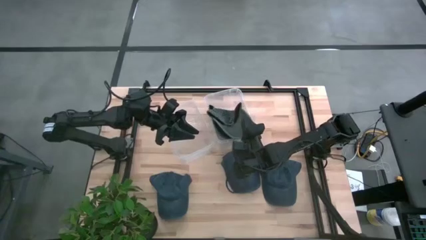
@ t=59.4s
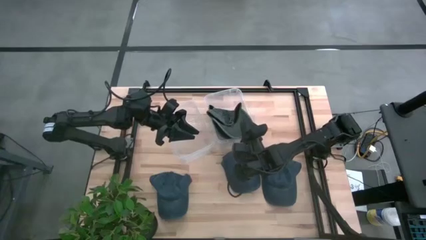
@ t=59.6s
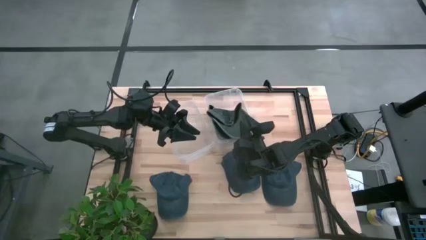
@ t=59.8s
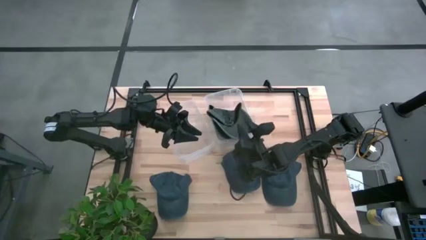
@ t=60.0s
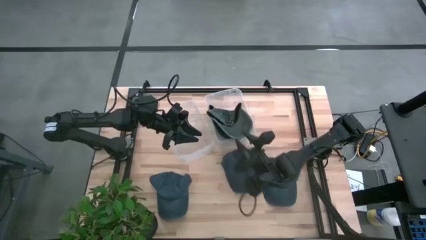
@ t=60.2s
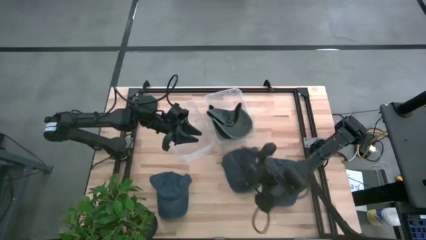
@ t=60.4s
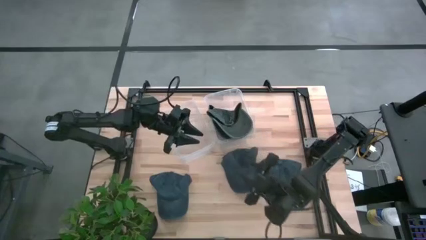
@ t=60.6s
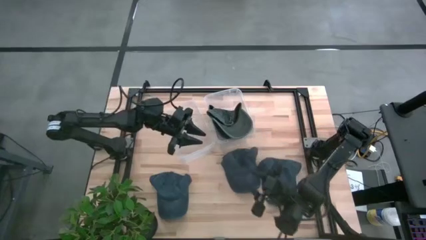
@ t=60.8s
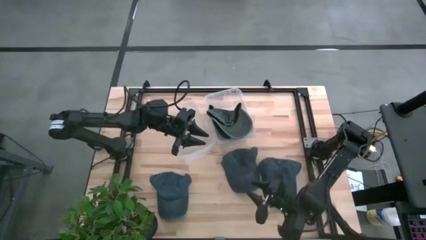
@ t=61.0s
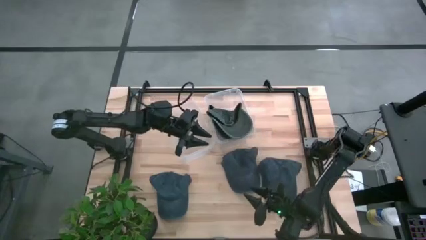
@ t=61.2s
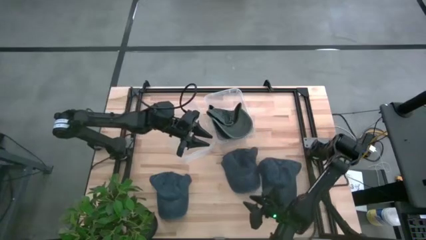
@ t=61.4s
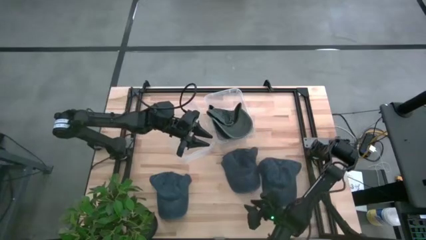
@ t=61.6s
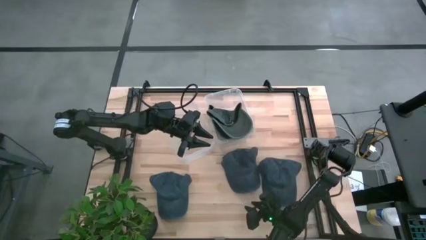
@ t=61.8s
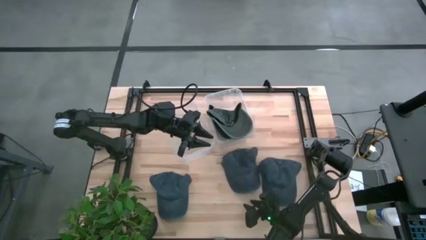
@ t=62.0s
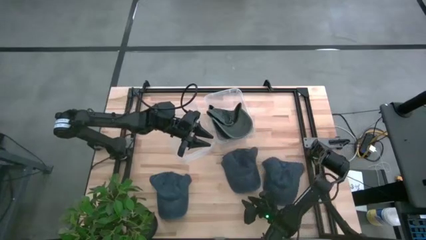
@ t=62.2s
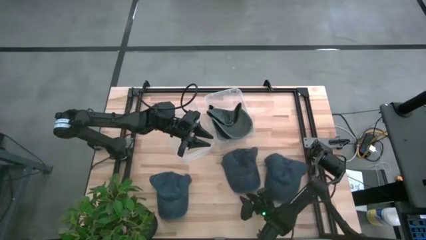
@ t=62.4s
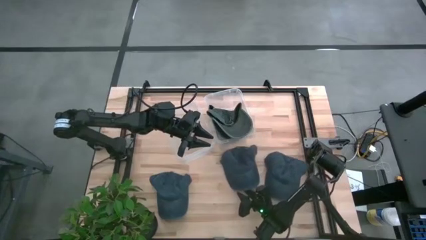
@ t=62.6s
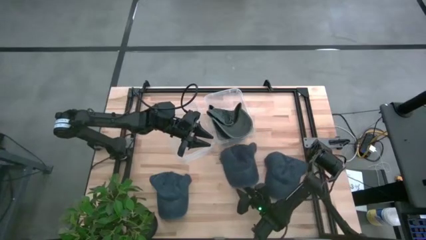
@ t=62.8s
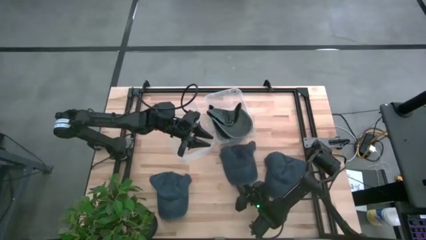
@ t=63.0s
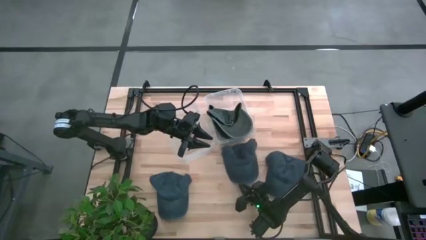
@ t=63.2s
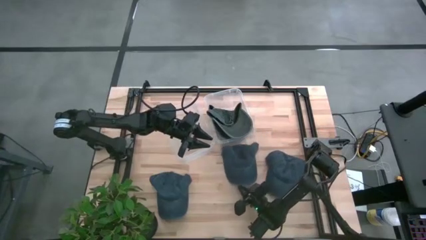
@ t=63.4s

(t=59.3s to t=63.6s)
Task: Pick & Place hat
Put the middle dark blue cap into the left transparent bin

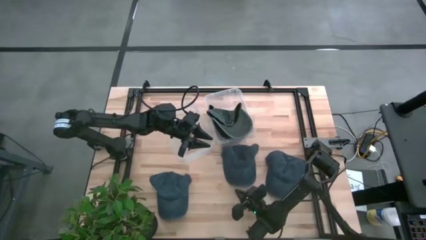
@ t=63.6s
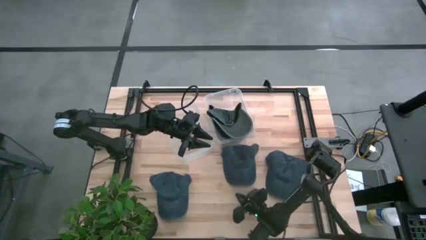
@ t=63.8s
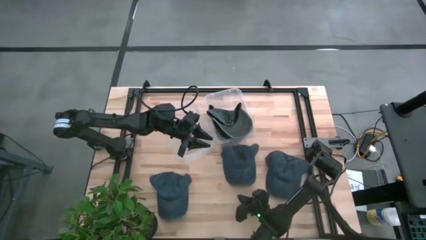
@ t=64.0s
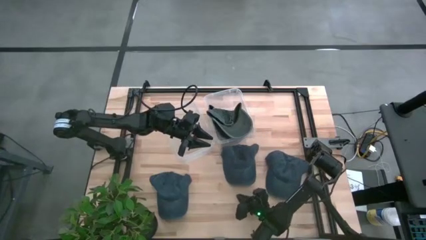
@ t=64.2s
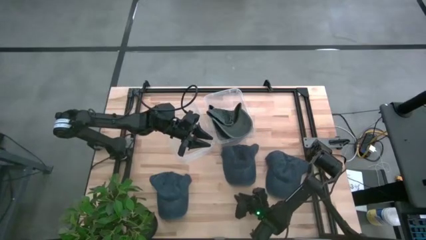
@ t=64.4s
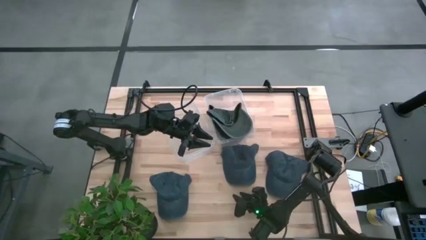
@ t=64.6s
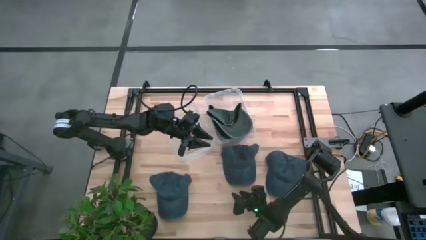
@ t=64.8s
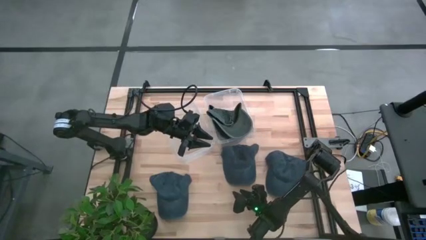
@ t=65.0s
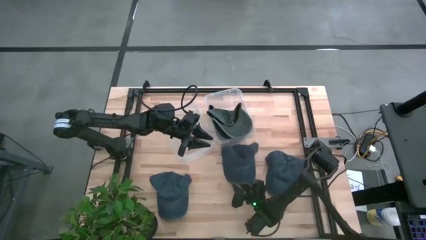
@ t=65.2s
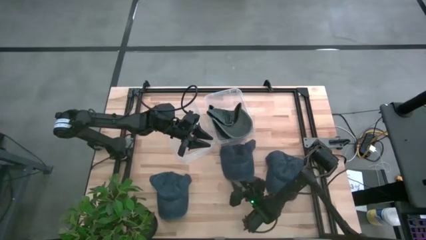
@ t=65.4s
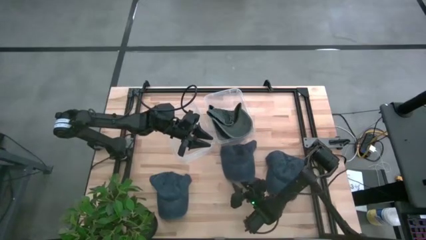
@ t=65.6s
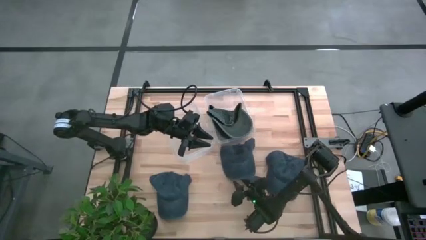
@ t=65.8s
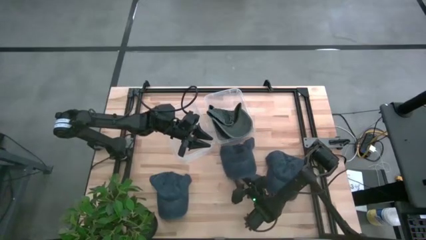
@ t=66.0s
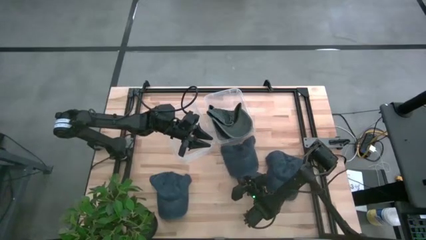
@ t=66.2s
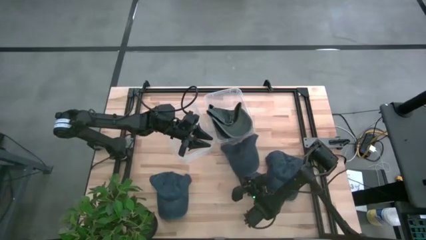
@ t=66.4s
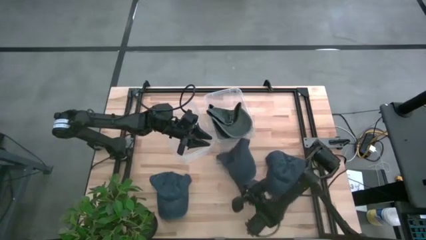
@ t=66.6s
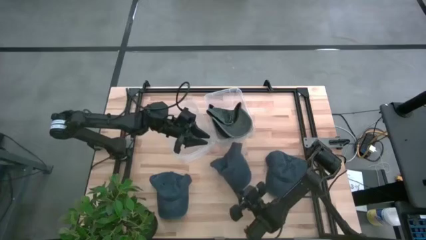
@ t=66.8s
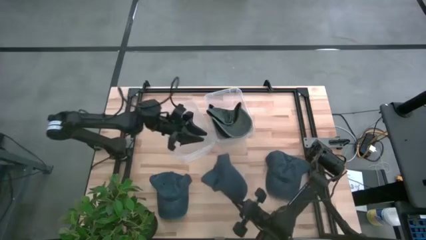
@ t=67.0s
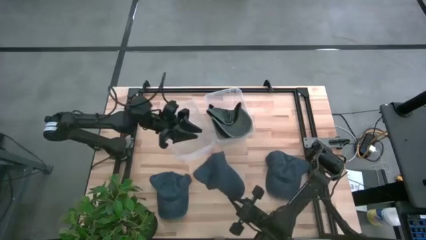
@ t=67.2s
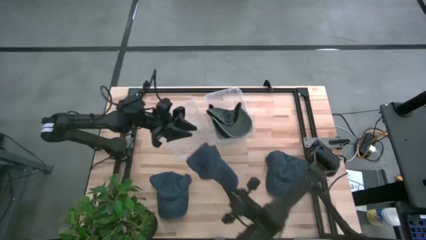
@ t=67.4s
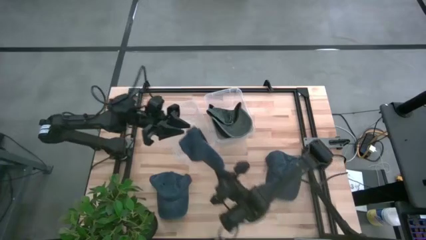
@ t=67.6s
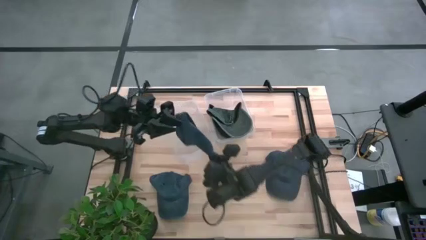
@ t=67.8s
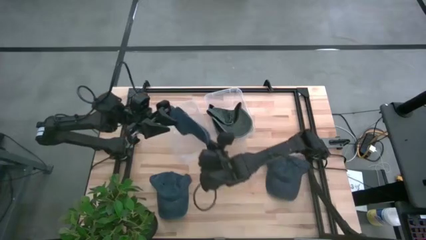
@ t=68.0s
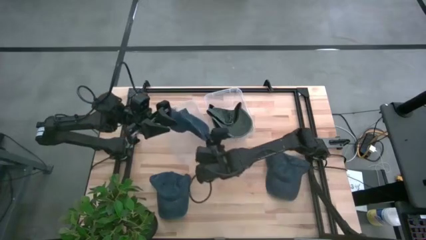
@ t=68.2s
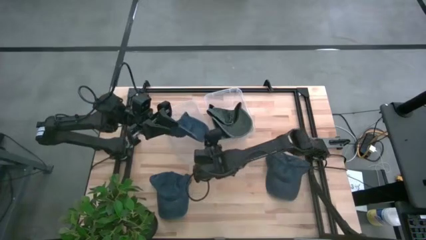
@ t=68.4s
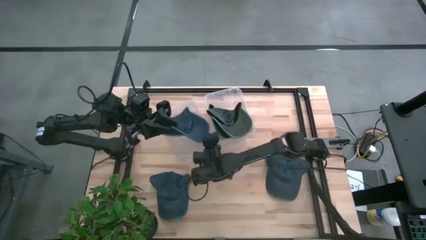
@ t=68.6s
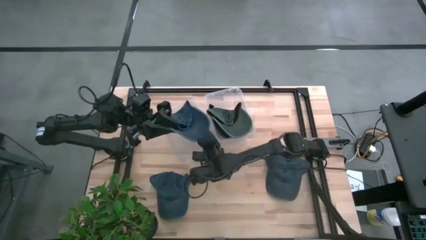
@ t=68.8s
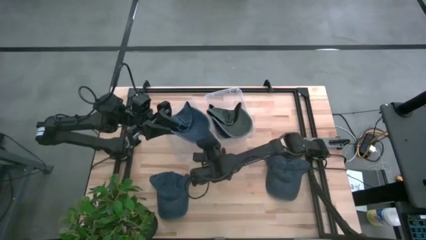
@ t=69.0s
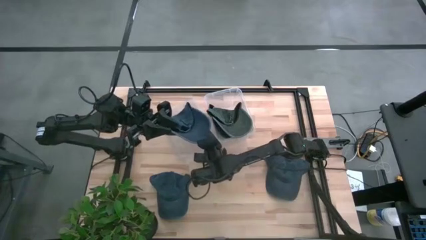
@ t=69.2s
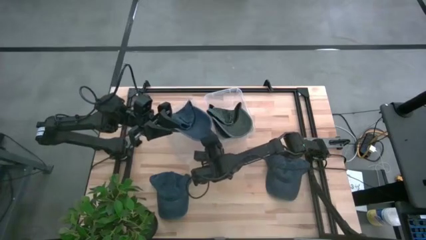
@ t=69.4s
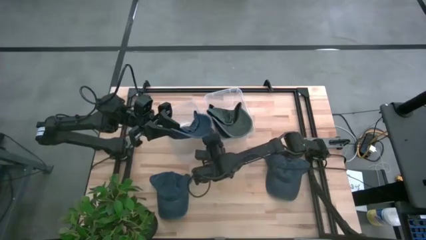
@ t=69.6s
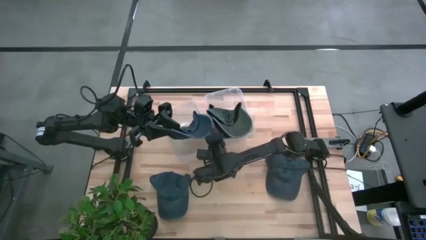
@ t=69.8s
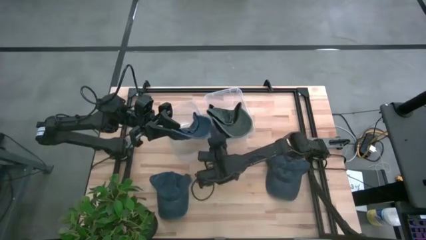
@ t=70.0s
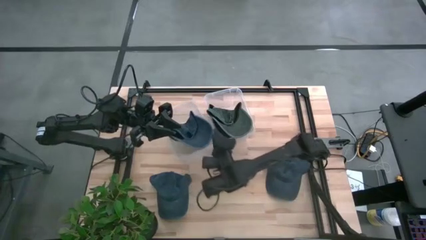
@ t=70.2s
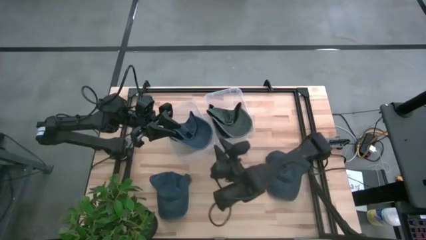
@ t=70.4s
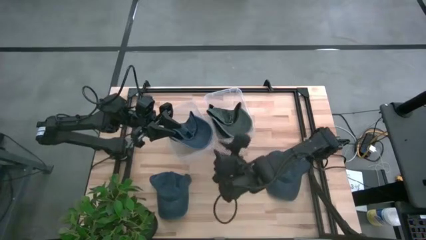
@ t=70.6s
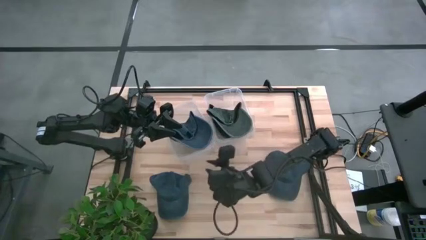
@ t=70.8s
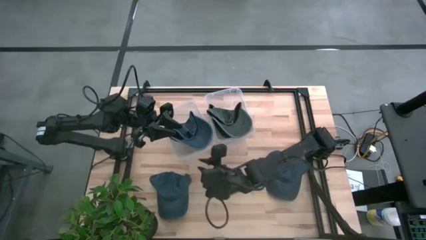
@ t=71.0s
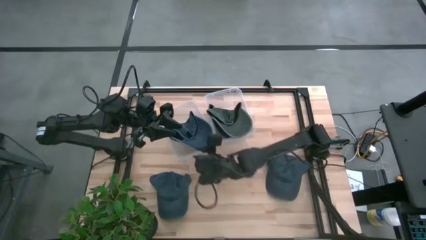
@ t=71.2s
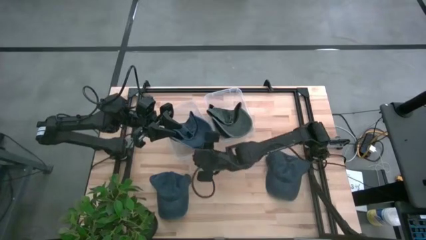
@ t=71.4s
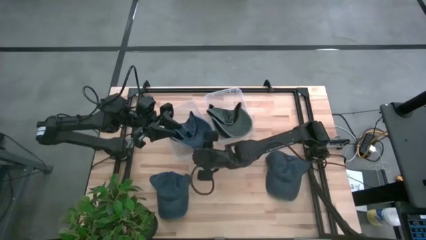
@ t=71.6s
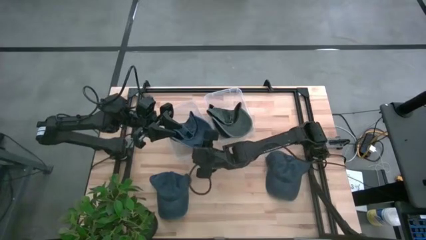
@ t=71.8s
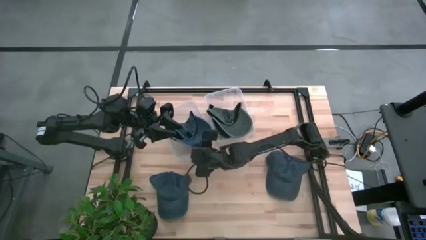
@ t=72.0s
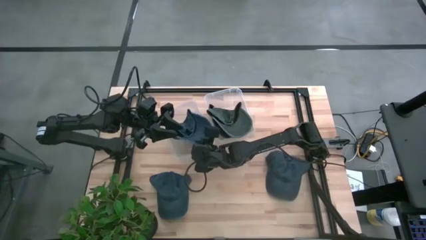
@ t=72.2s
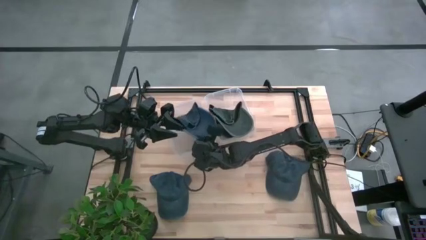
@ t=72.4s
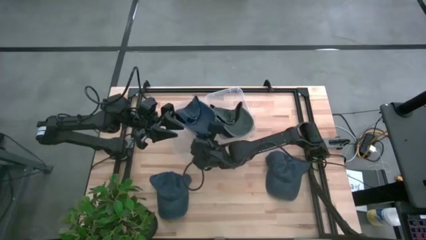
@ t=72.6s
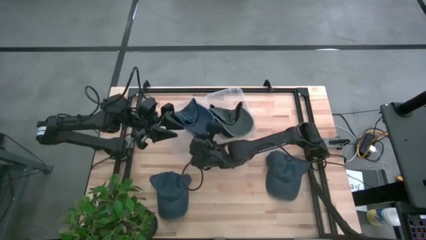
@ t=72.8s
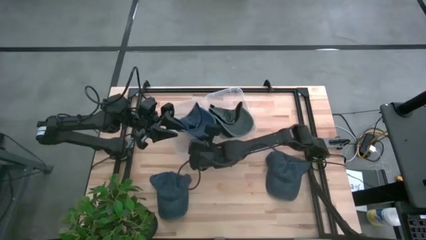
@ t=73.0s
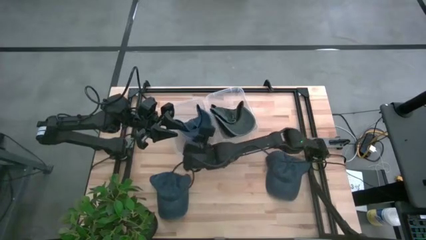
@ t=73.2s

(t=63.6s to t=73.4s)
Put the middle dark blue cap into the left transparent bin
